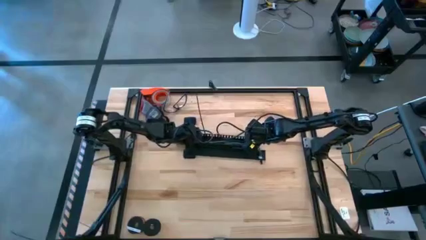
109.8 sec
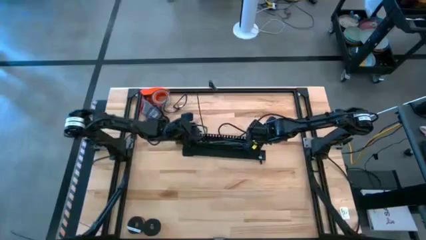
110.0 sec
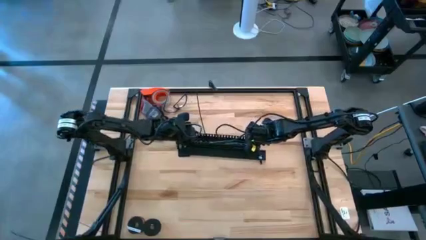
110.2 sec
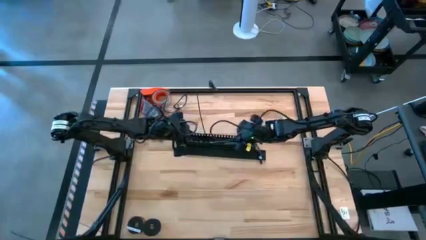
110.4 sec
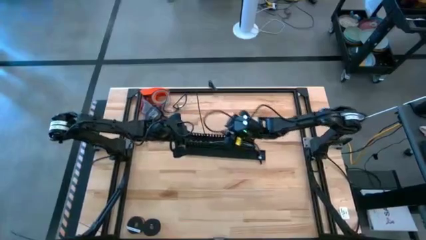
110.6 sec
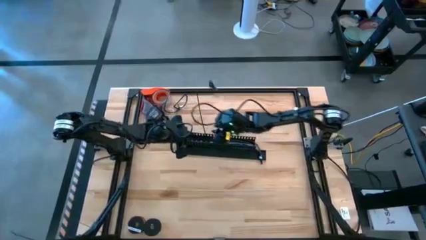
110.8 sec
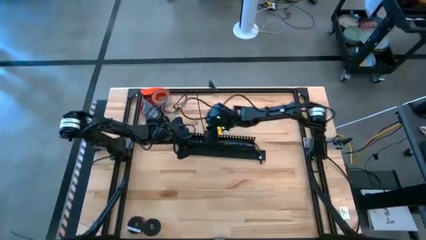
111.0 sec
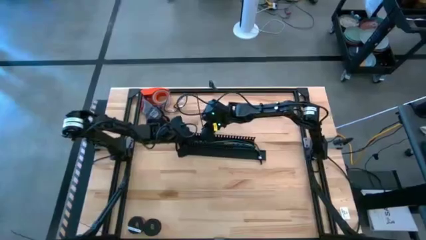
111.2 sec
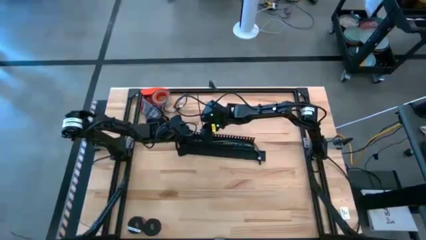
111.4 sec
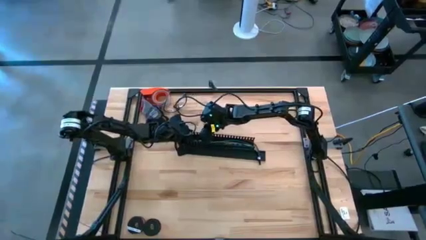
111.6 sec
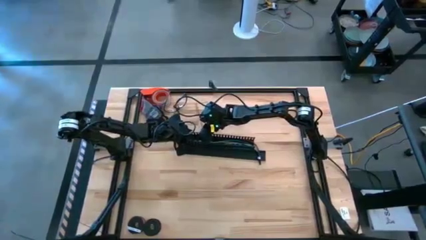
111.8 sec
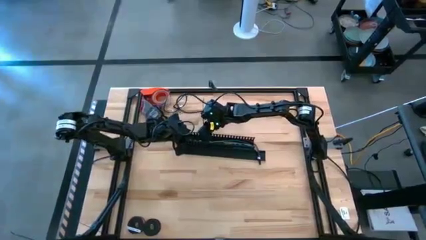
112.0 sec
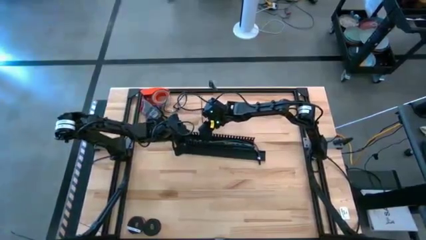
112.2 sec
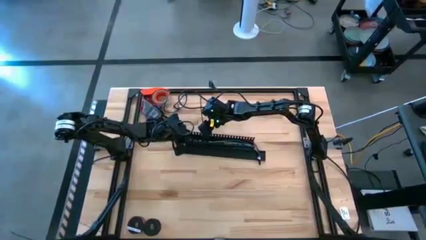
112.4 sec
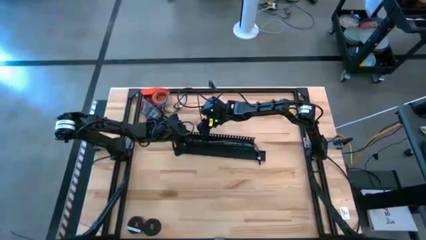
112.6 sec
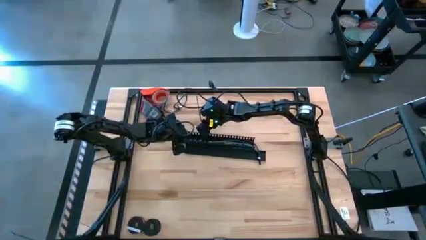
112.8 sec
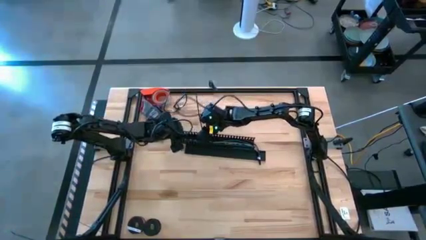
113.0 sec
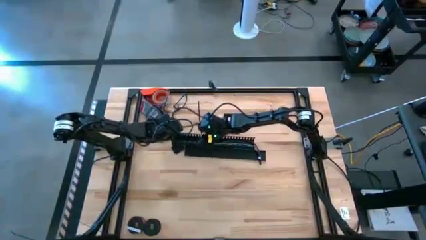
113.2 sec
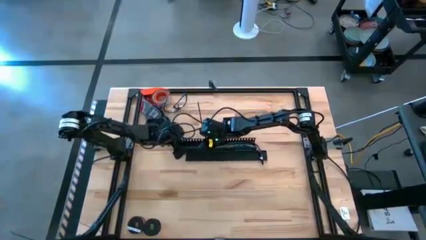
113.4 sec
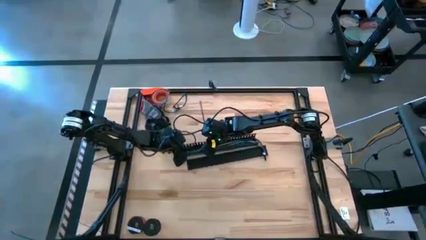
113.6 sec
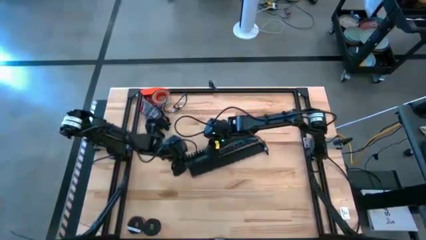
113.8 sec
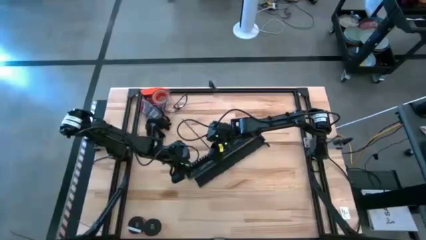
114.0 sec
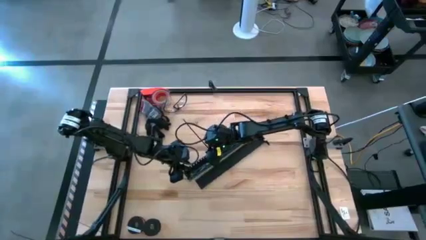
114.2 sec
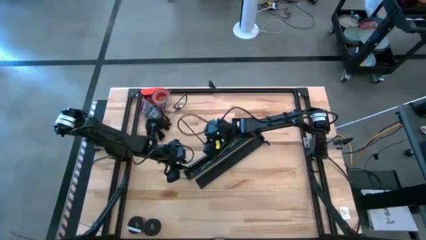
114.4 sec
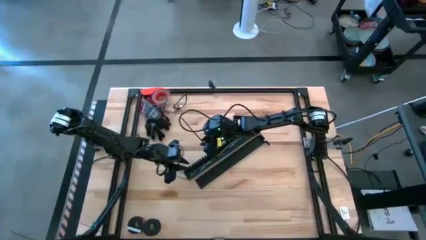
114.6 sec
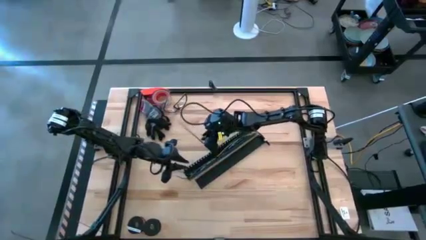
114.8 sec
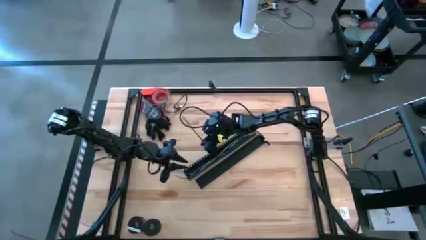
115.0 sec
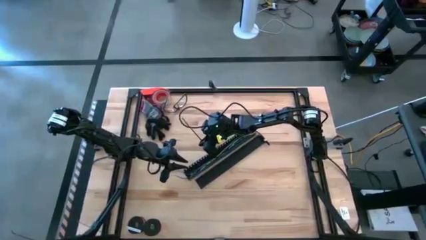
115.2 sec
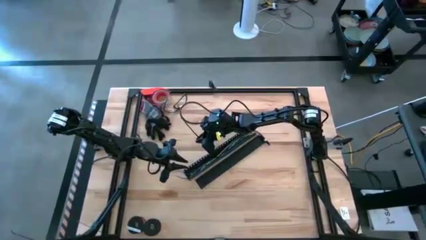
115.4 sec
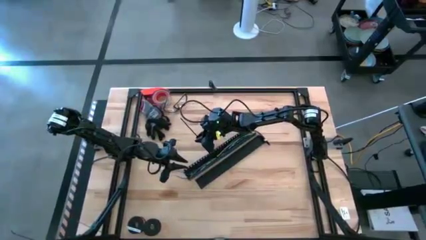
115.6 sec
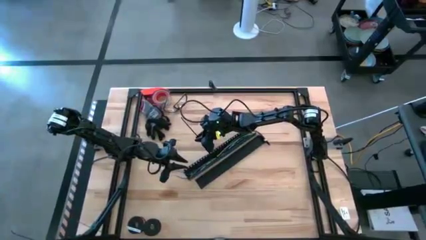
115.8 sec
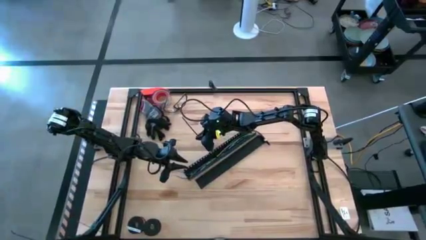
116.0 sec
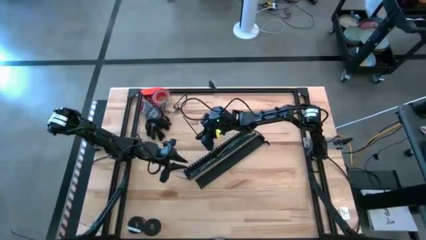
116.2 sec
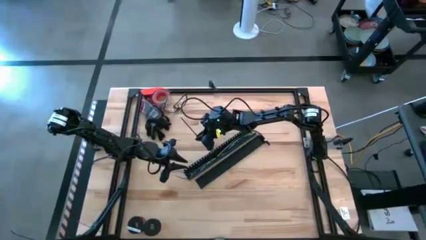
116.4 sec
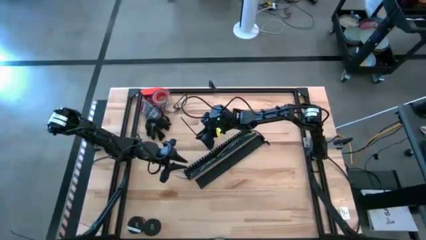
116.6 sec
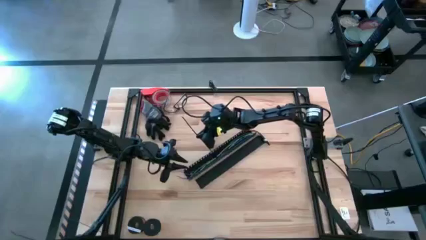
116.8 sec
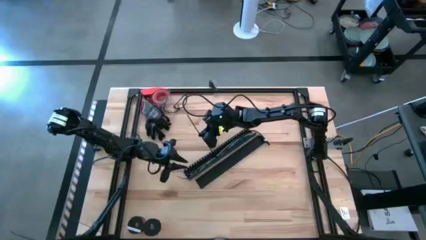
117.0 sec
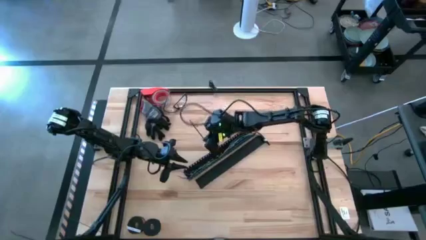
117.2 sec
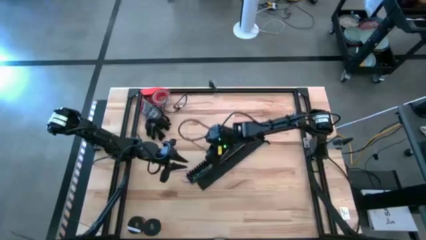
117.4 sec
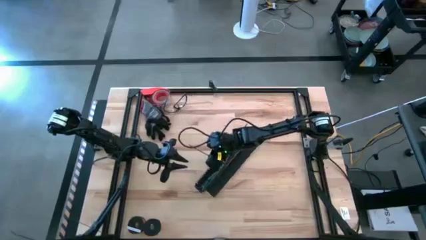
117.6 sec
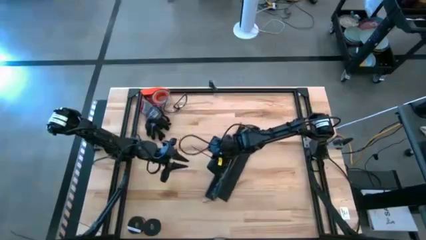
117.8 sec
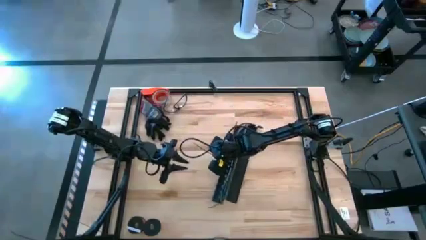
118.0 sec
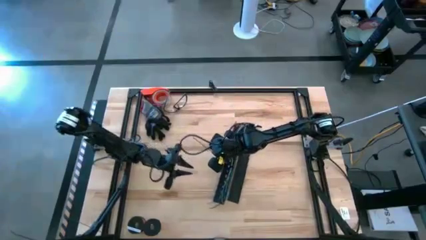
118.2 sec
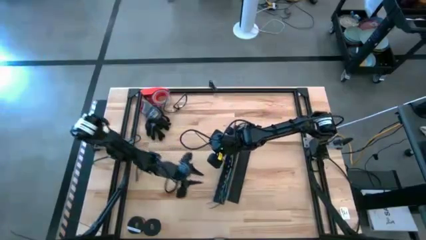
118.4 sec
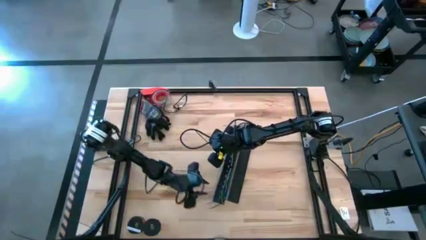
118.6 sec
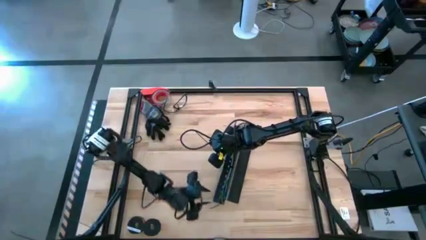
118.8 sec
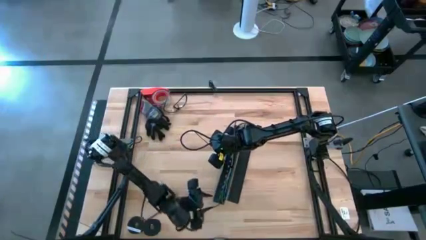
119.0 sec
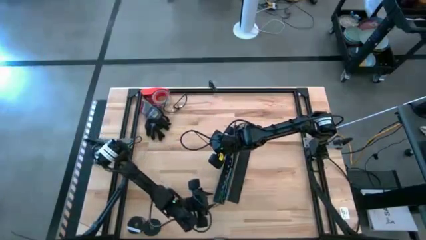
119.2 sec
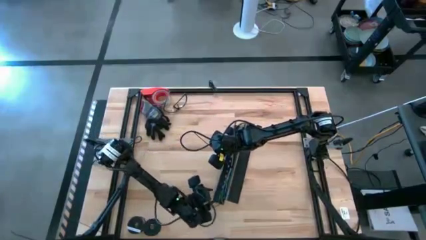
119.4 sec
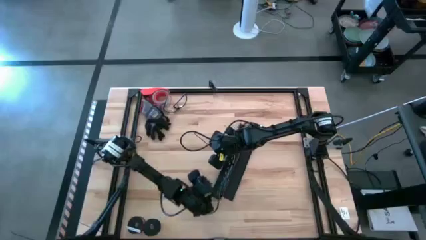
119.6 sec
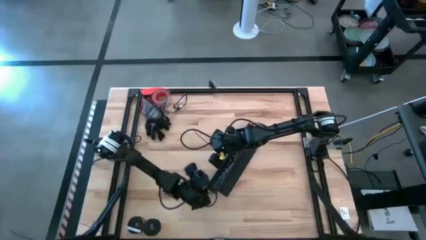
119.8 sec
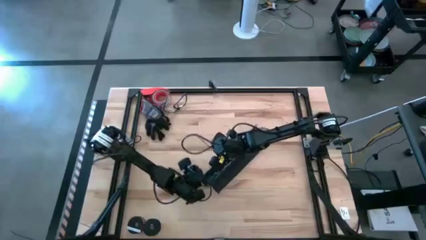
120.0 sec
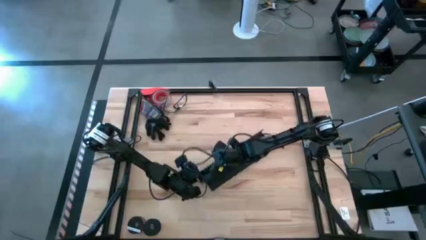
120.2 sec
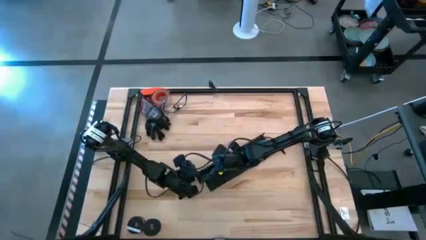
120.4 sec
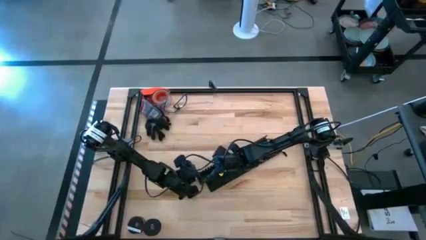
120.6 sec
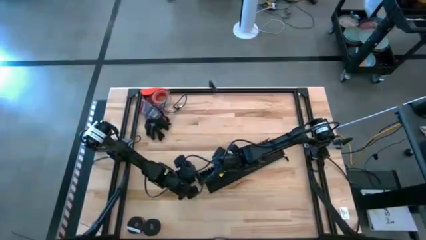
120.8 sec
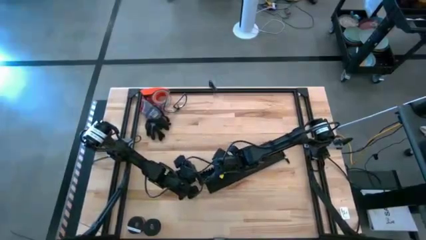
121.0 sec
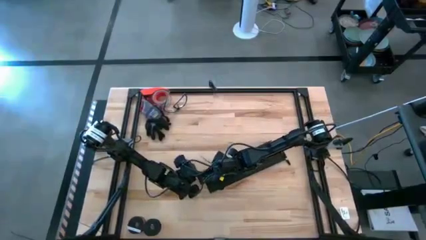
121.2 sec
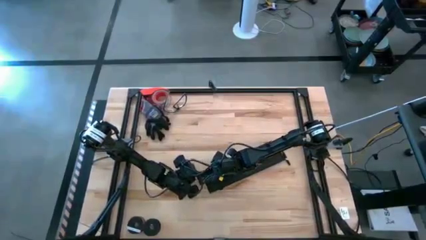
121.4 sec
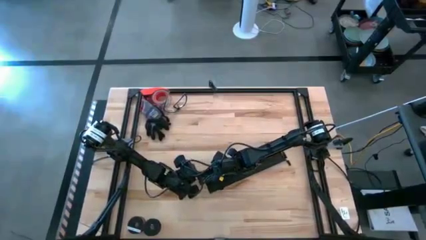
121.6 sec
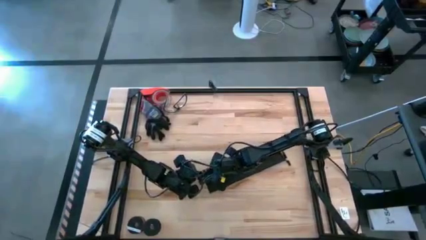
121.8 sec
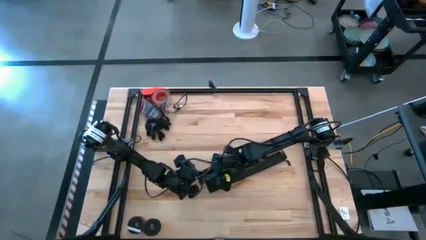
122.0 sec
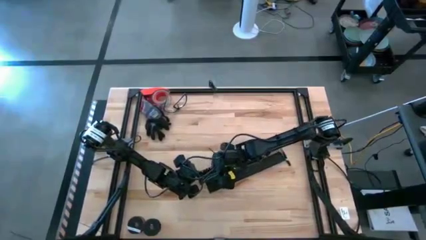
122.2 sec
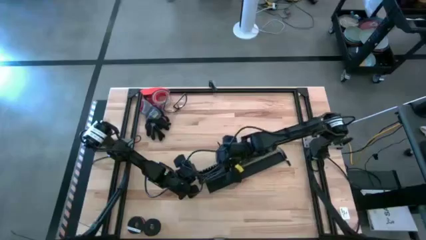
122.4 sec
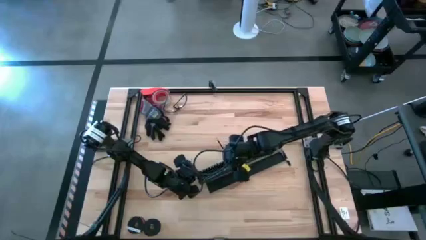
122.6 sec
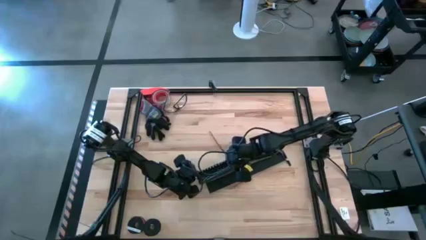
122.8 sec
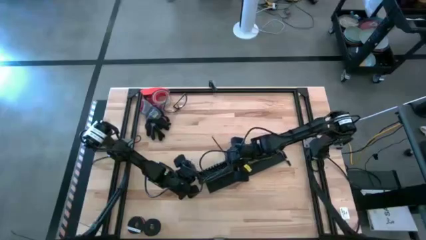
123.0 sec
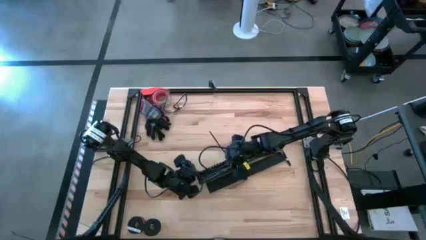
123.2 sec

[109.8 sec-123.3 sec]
Task: Ziptie cables
Put the ziptied cable wires into the black cable duct

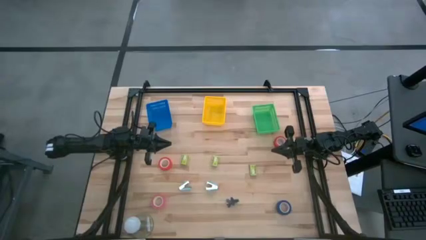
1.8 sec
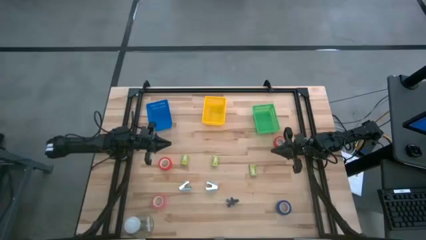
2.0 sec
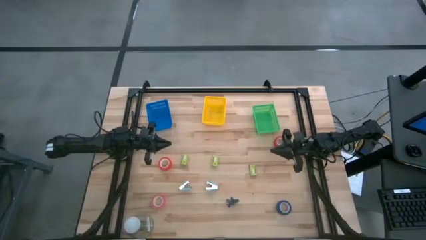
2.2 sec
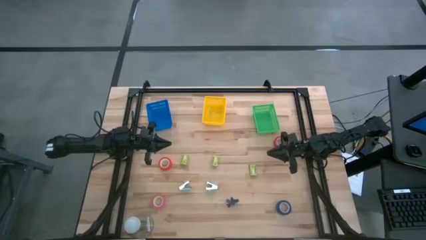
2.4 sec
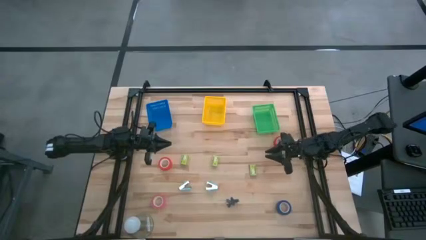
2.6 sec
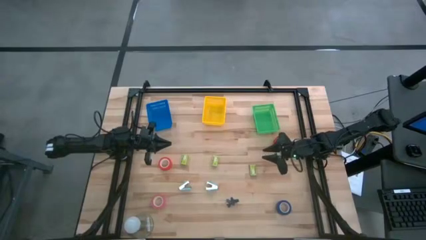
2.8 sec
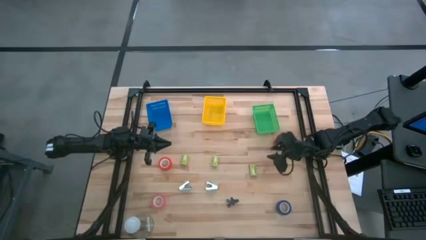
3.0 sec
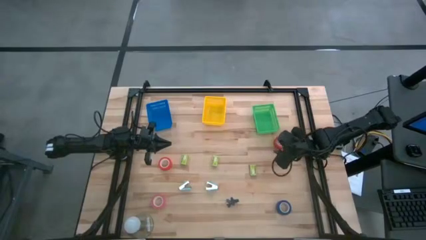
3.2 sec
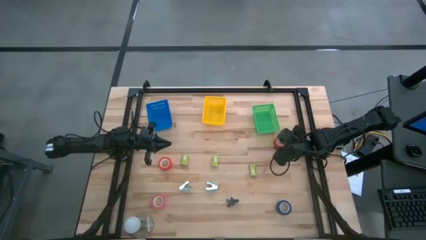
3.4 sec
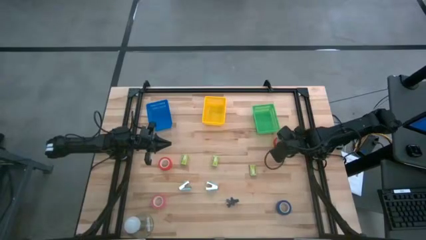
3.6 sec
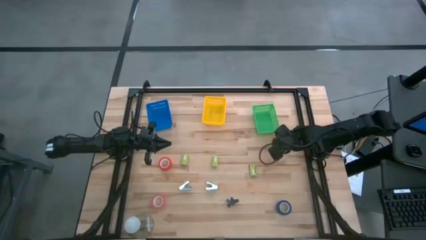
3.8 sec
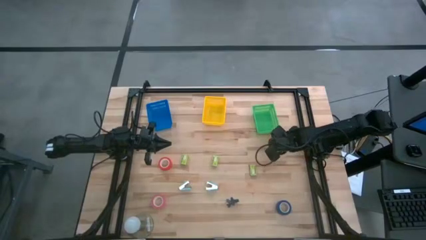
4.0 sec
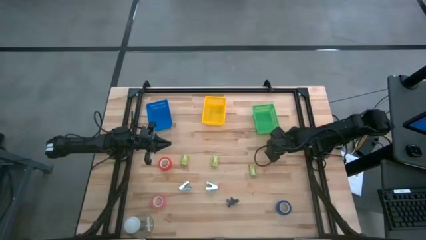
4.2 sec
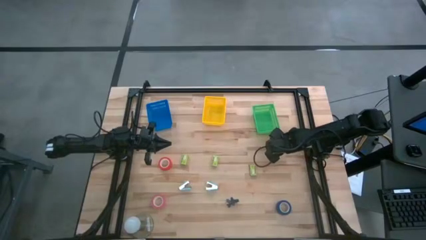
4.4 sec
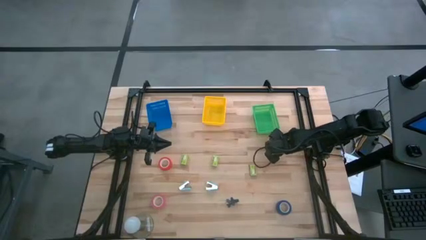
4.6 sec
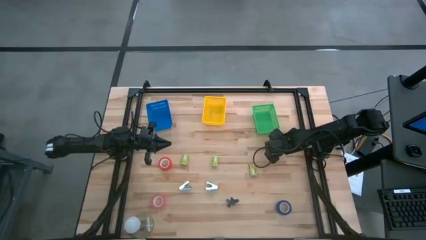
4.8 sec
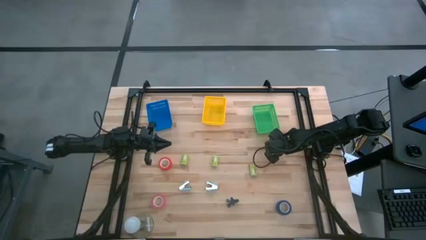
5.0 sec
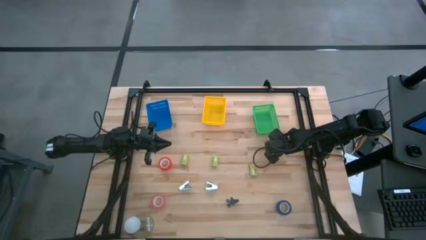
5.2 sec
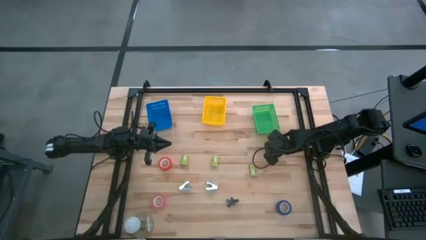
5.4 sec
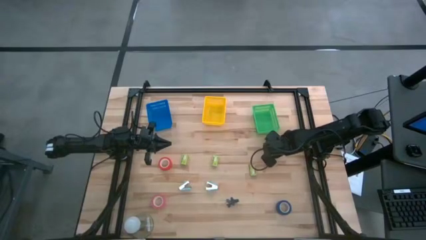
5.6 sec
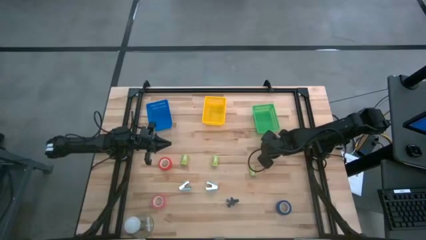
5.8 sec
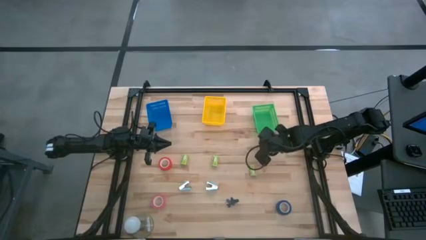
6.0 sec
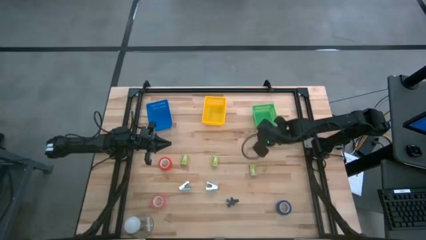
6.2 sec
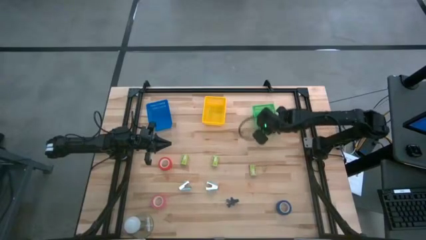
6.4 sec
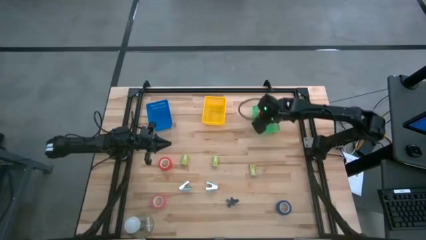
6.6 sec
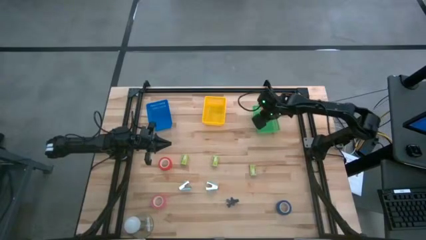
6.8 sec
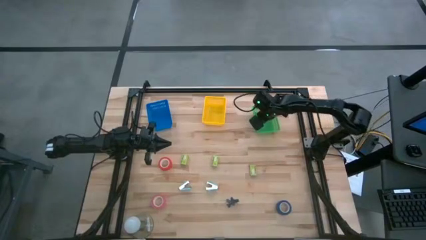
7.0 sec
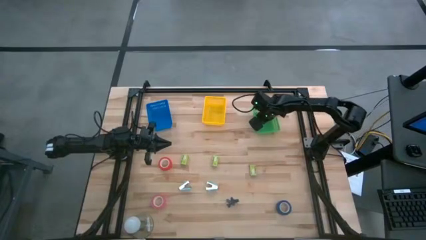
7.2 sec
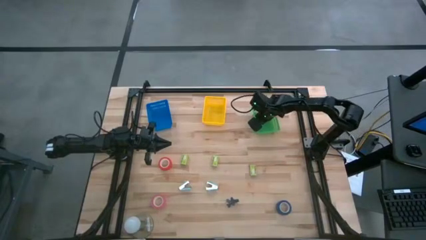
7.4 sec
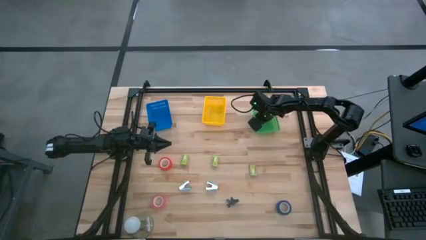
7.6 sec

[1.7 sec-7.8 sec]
Task: Pick and place Stapler, Stapler remover, tape
Put the right red tape into the green bin
